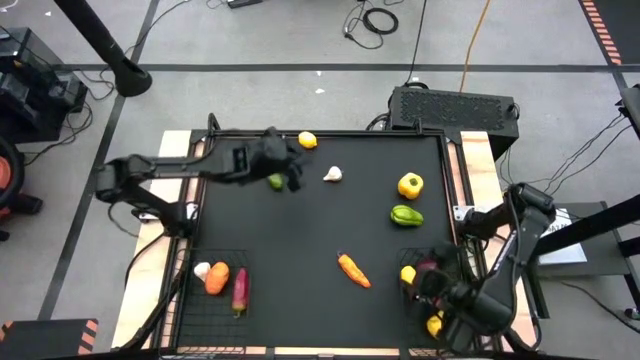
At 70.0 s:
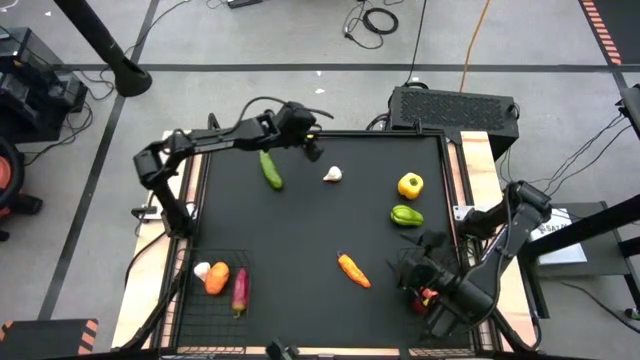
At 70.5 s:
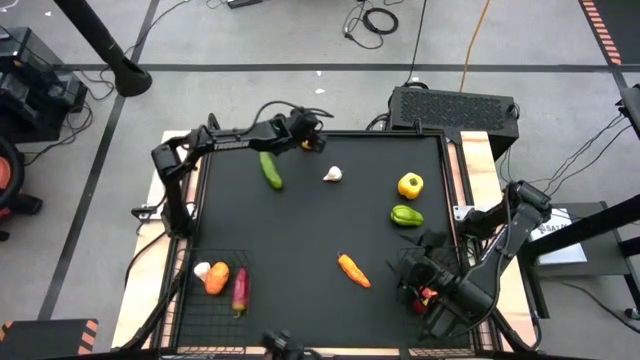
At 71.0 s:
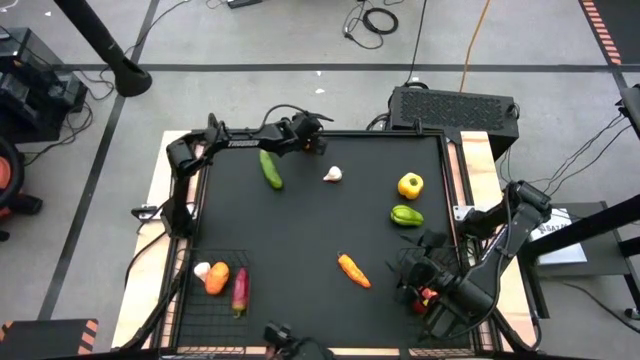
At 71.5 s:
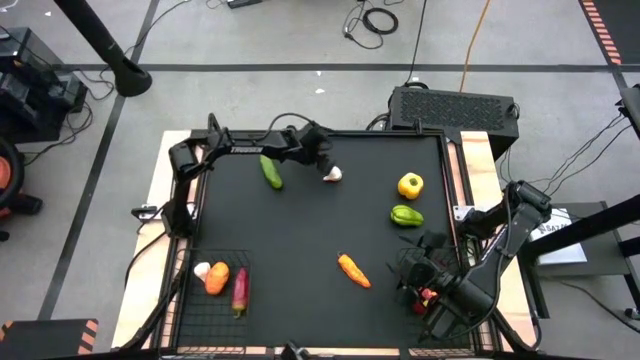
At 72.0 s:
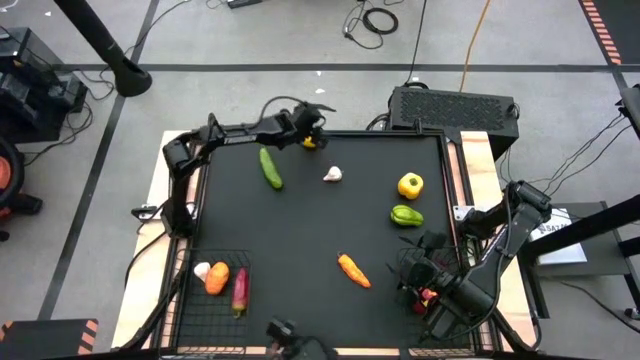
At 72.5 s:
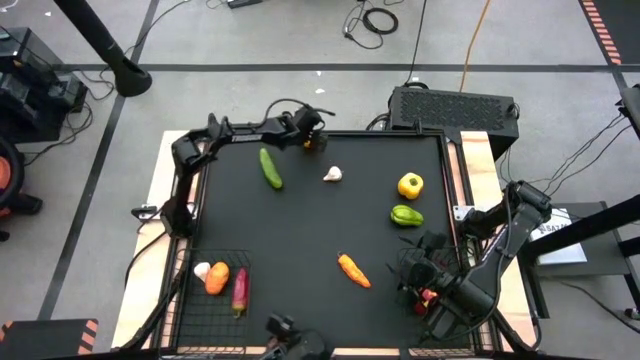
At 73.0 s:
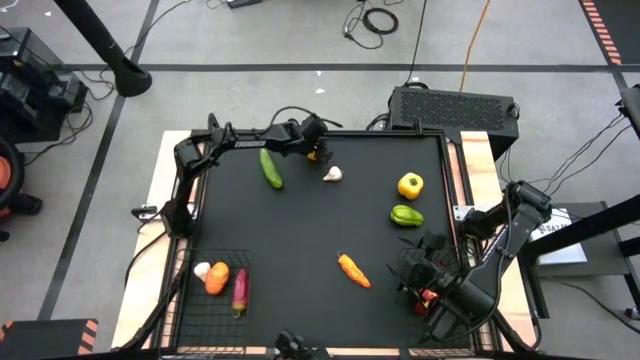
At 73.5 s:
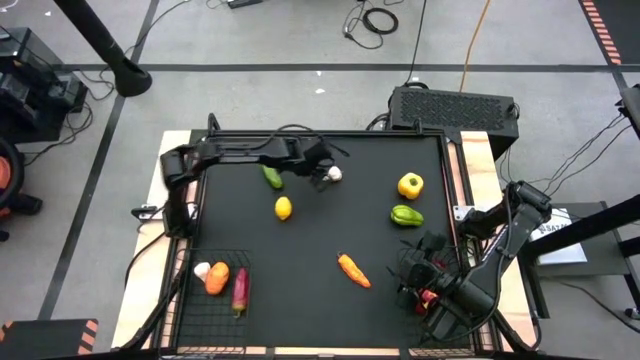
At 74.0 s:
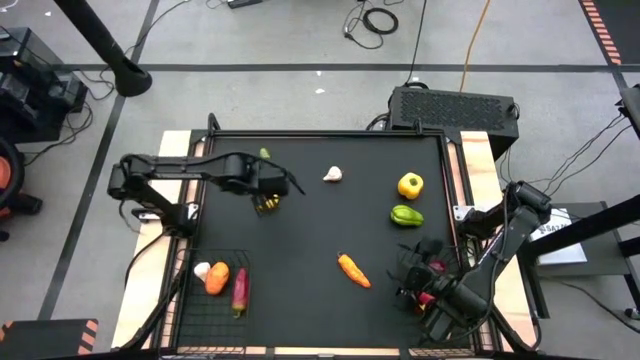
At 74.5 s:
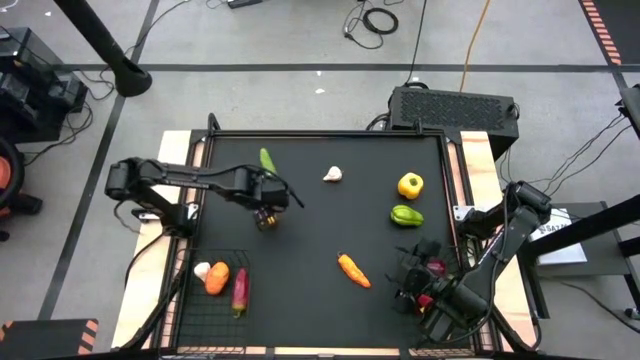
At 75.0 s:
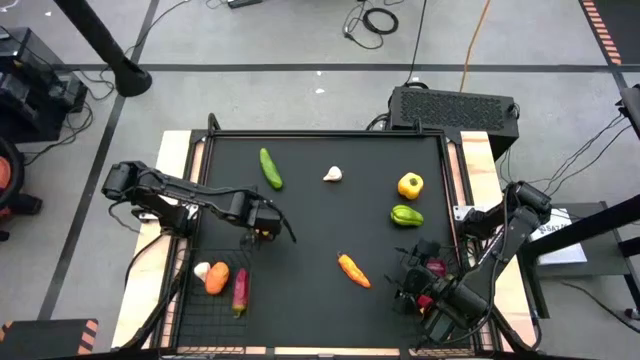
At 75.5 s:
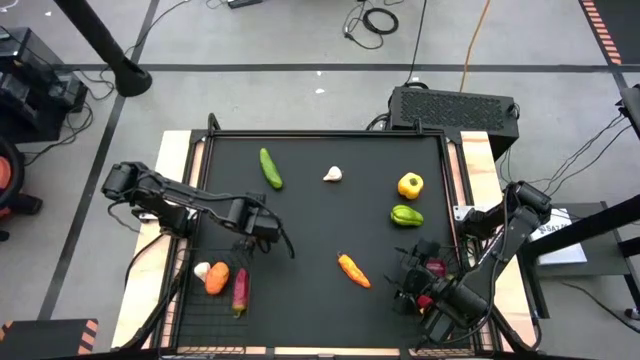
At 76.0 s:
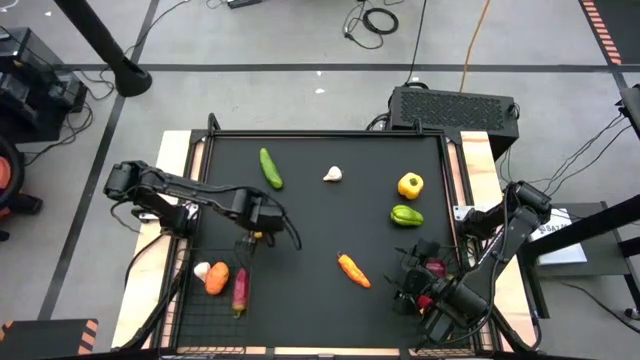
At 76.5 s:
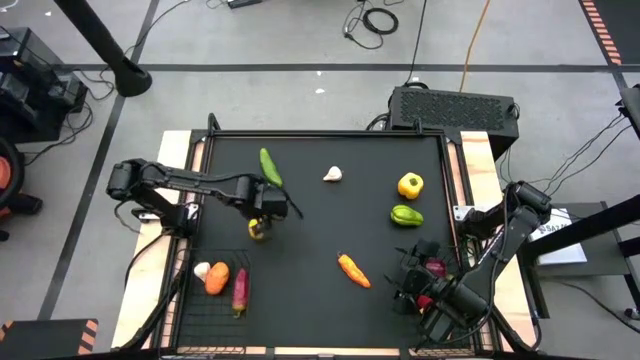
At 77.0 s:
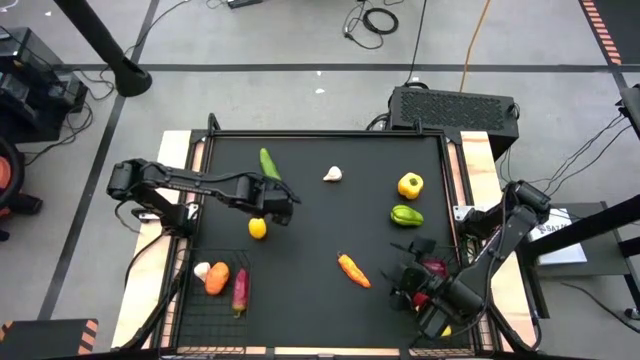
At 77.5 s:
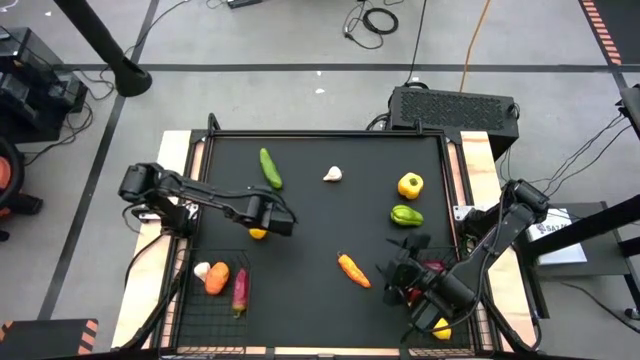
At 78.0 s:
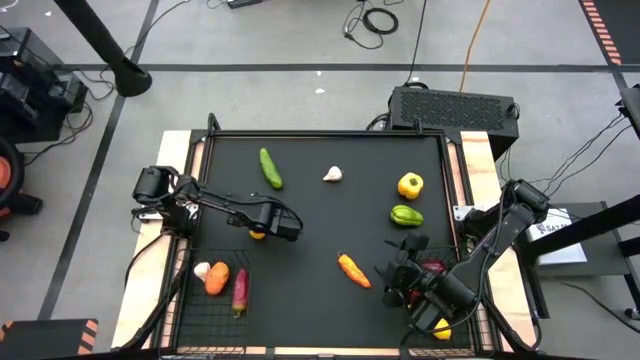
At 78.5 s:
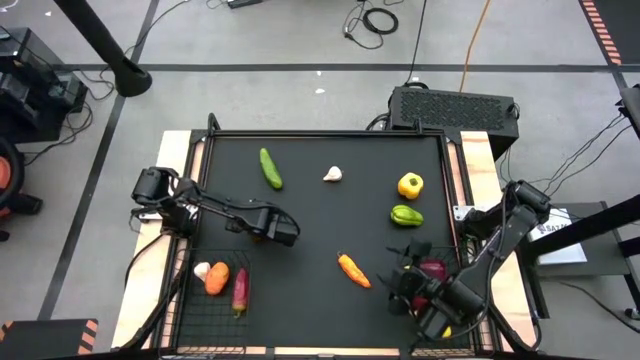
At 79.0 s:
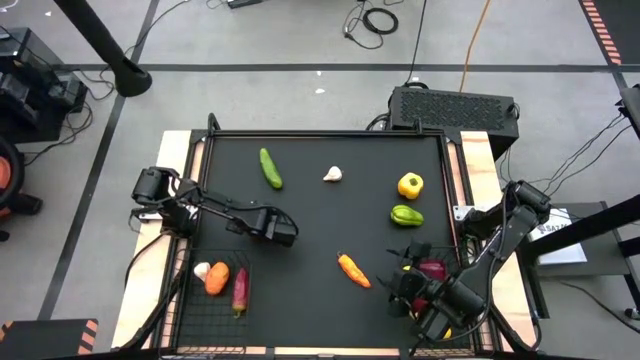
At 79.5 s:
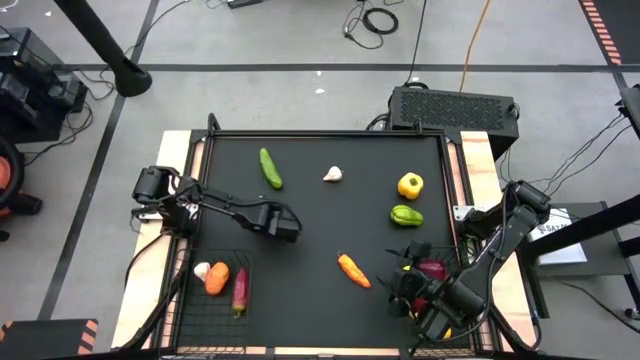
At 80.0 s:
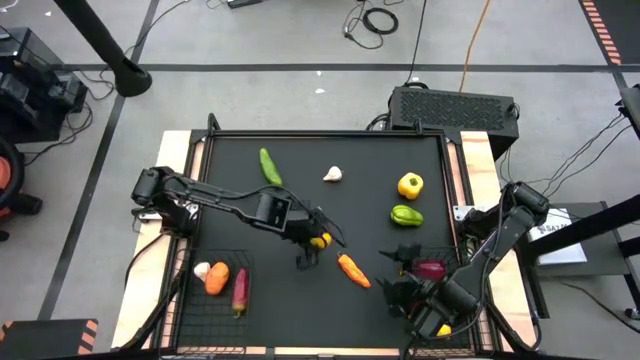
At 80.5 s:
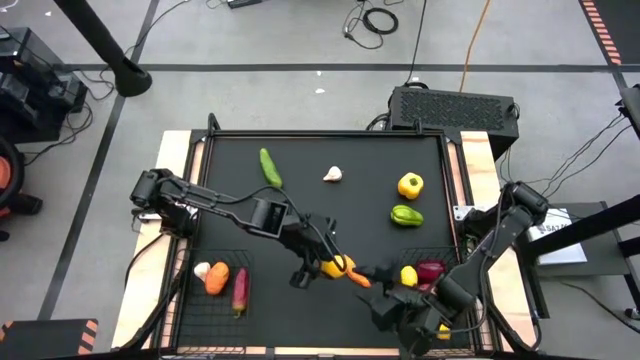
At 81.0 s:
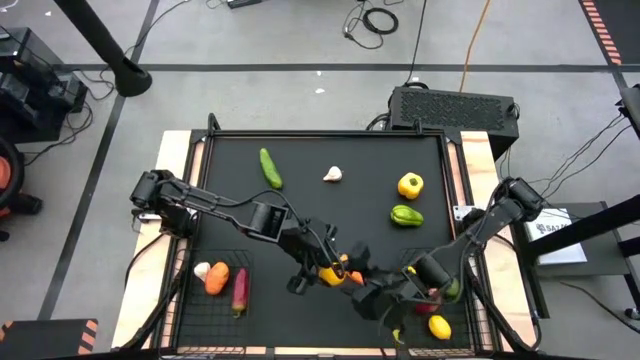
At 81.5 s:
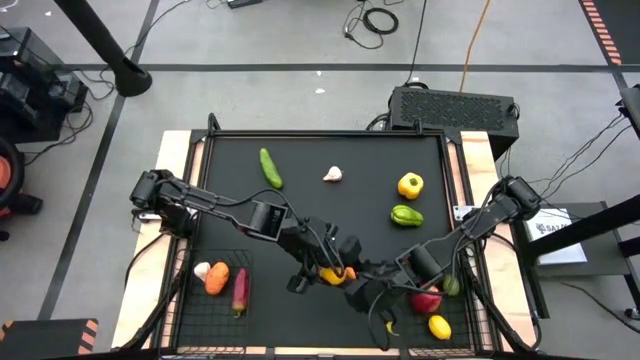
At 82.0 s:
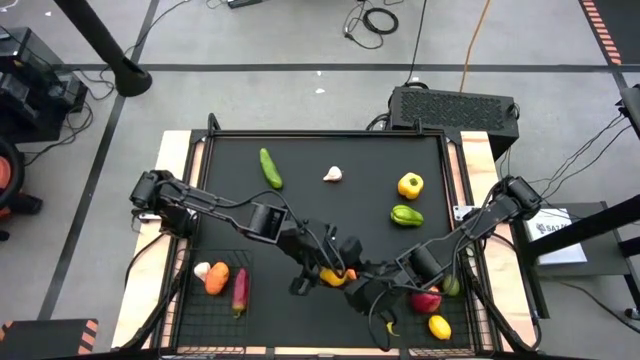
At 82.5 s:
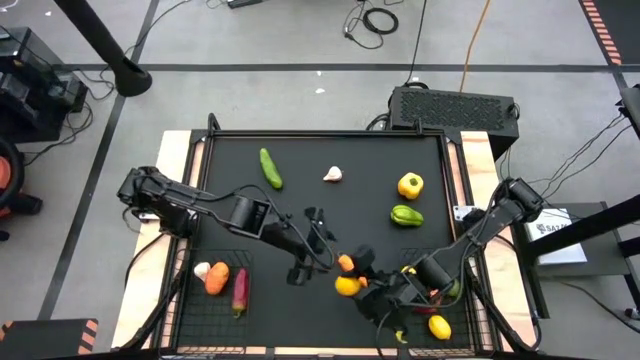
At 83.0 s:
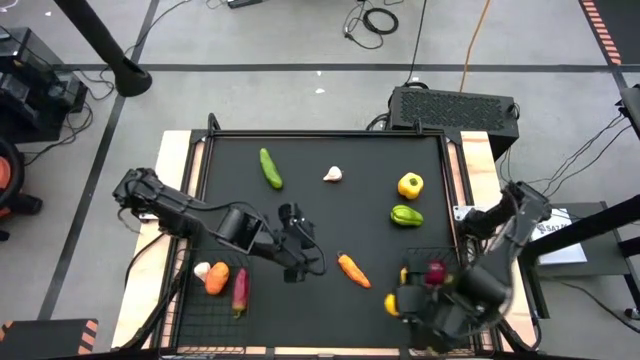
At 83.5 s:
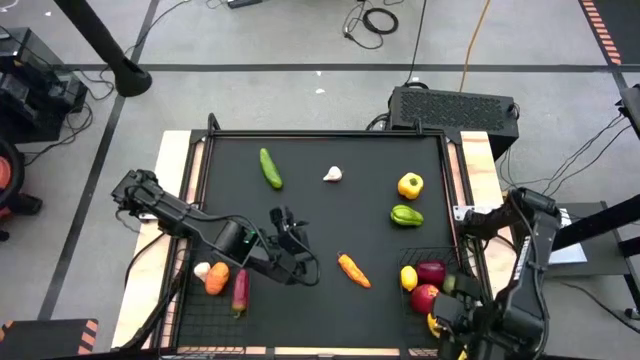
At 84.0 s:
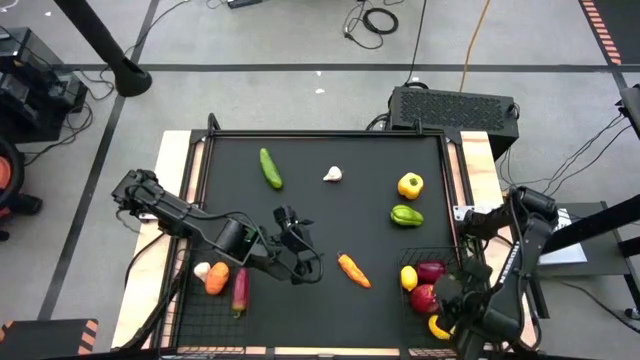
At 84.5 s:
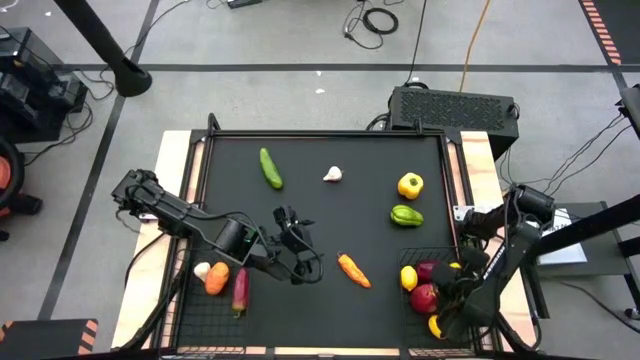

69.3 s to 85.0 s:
Task: Sort produce into baskets
Put the lemon into the bottom right basket

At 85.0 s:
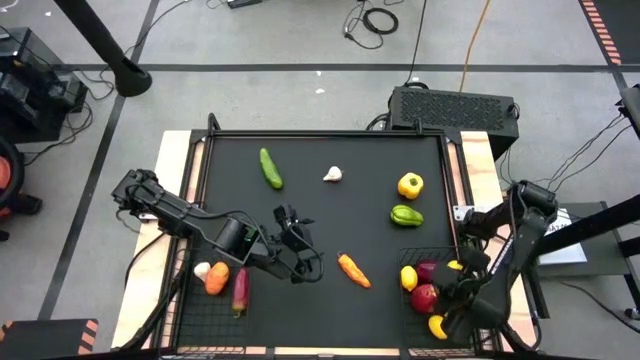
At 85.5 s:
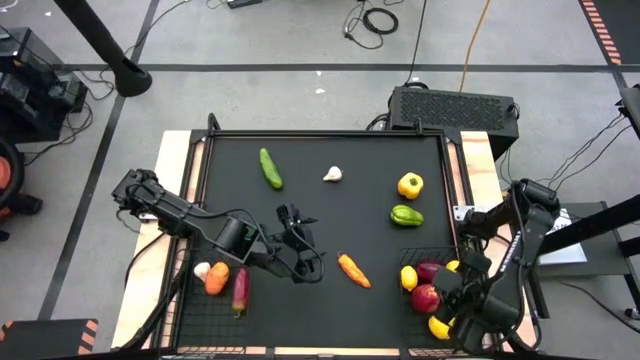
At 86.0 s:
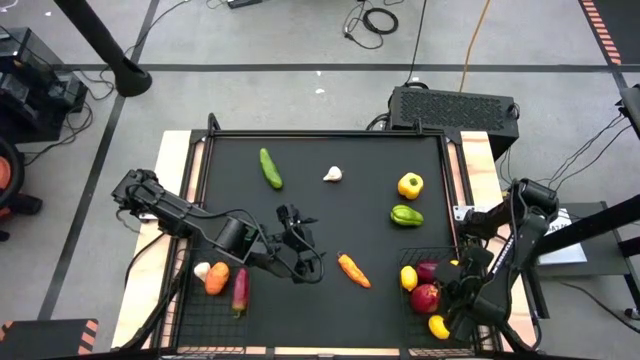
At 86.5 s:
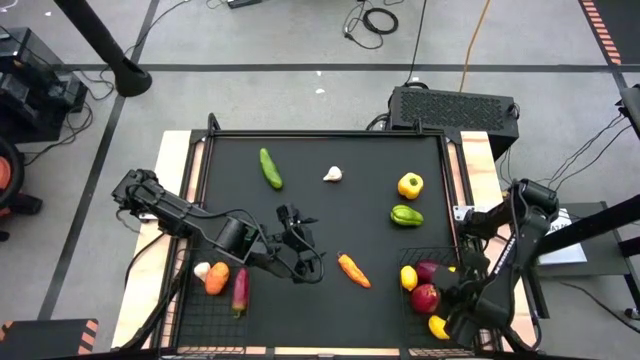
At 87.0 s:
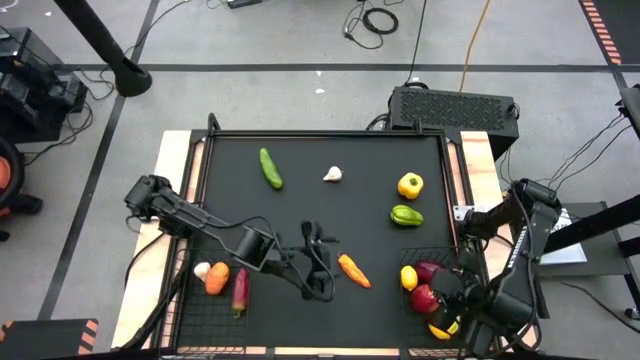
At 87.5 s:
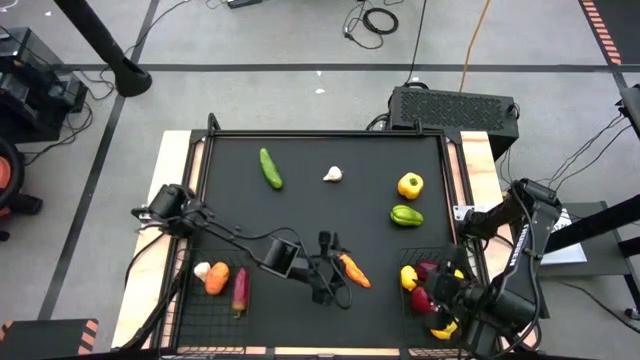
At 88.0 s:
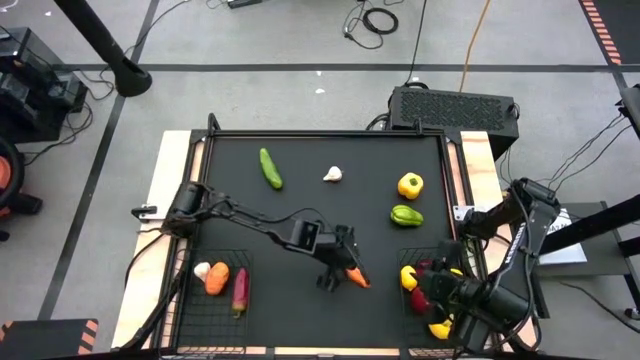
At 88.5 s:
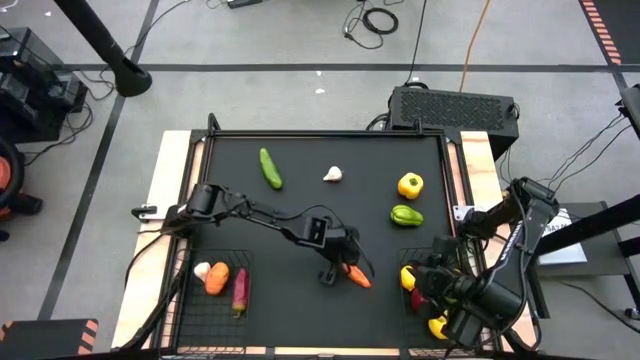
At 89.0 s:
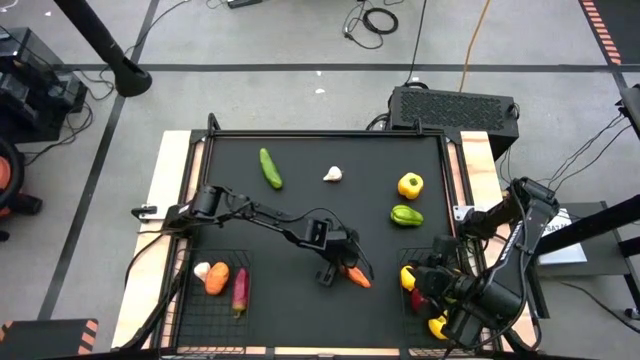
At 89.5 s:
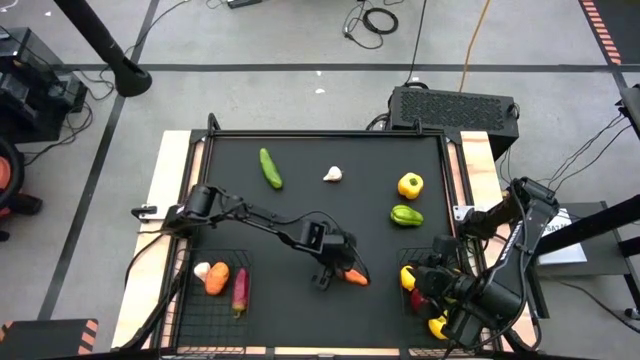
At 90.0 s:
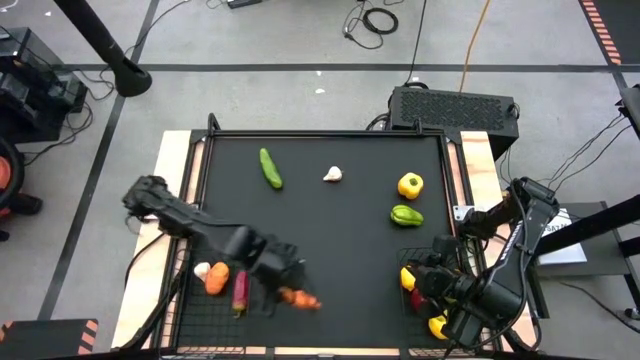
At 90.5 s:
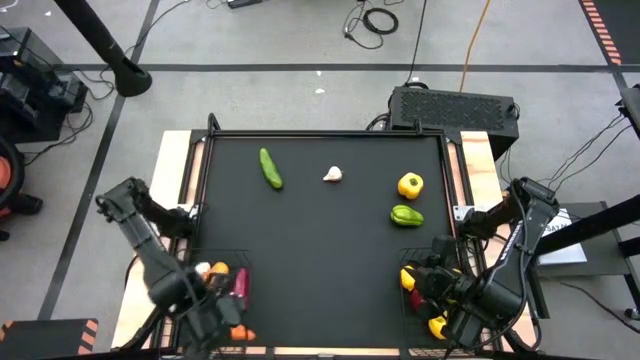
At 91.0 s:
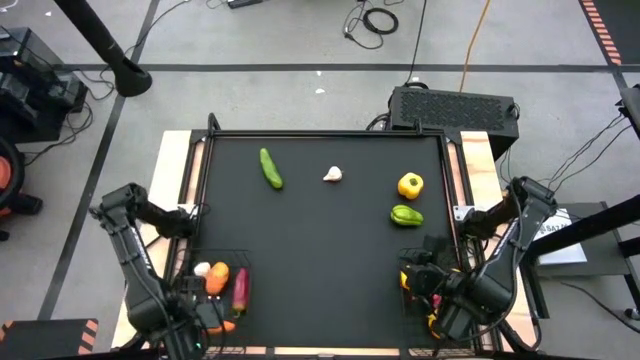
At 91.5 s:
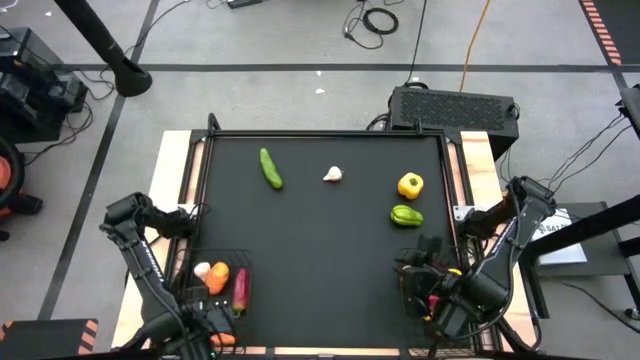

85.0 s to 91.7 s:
Put the yellow pepper into the bottom left basket
